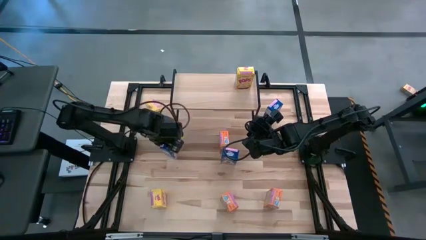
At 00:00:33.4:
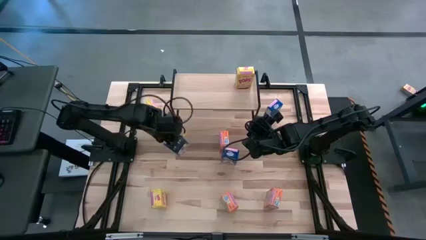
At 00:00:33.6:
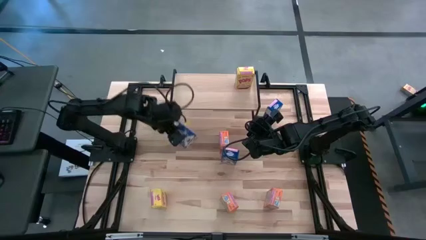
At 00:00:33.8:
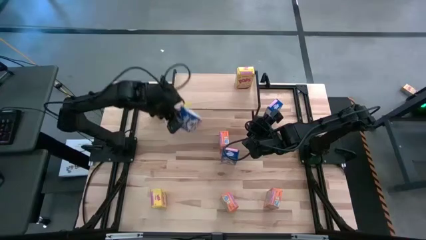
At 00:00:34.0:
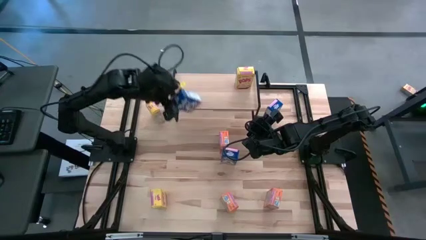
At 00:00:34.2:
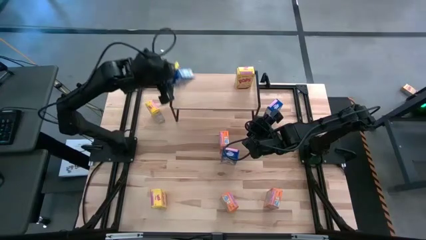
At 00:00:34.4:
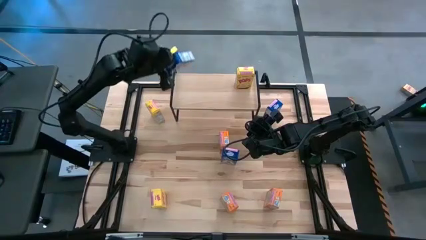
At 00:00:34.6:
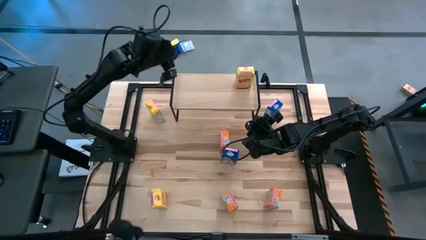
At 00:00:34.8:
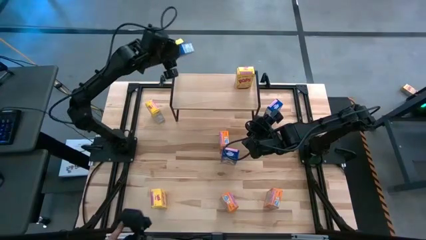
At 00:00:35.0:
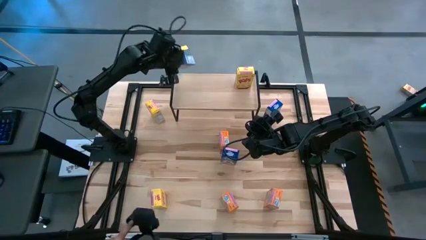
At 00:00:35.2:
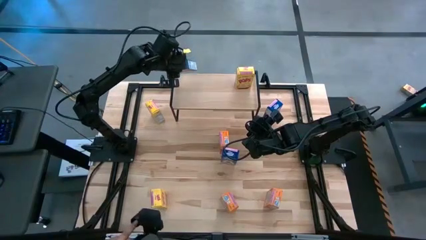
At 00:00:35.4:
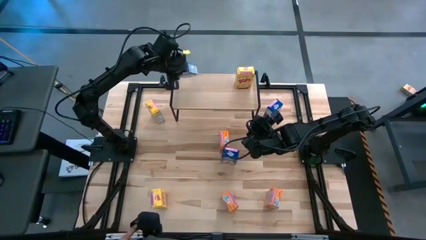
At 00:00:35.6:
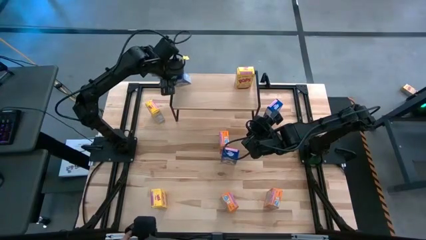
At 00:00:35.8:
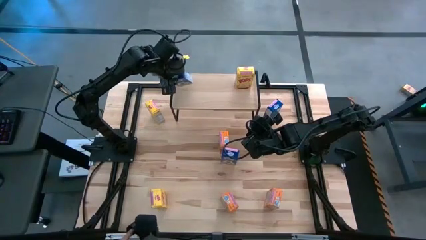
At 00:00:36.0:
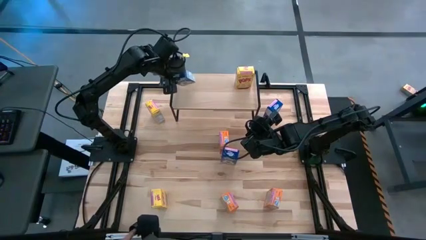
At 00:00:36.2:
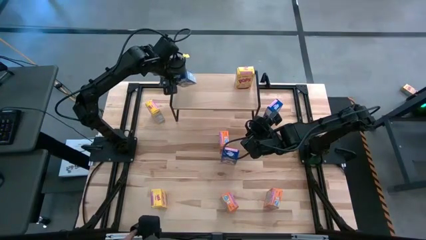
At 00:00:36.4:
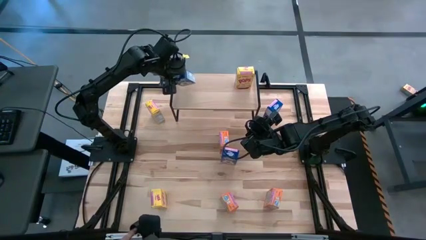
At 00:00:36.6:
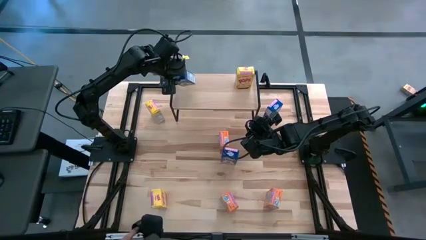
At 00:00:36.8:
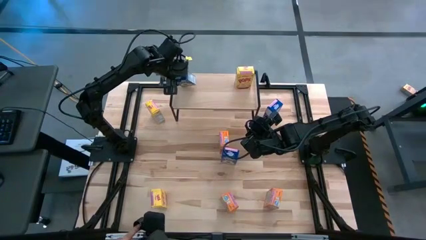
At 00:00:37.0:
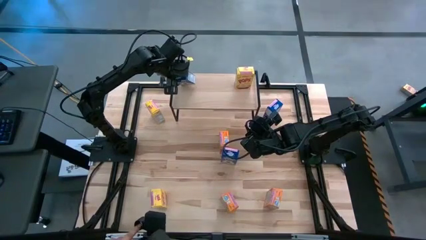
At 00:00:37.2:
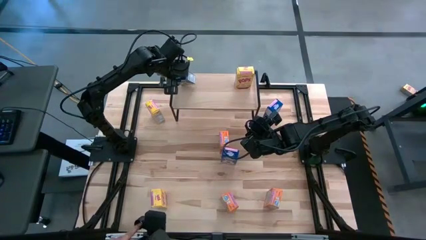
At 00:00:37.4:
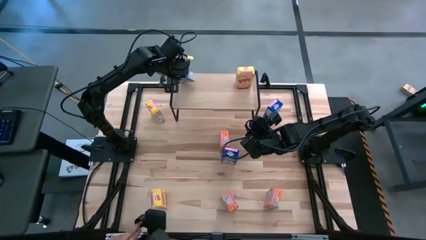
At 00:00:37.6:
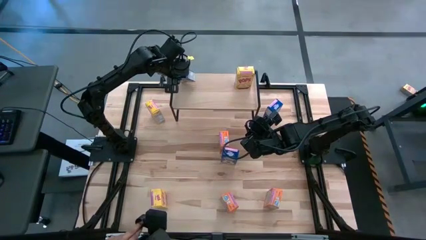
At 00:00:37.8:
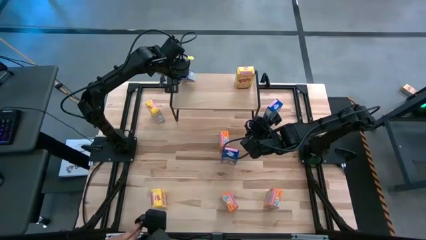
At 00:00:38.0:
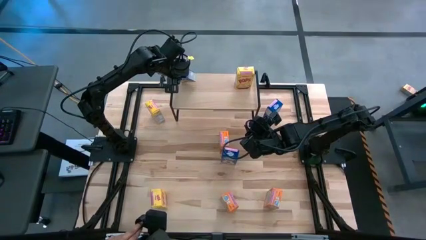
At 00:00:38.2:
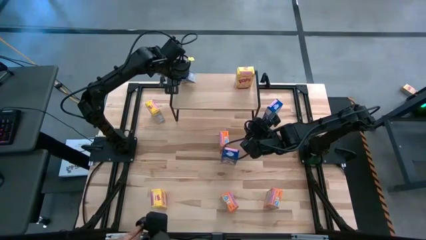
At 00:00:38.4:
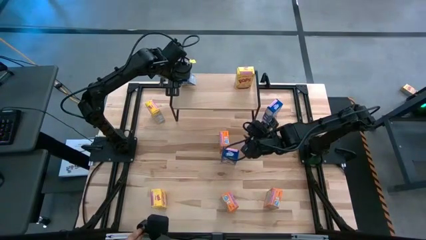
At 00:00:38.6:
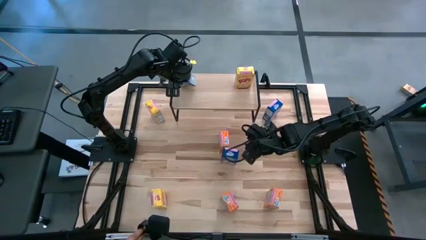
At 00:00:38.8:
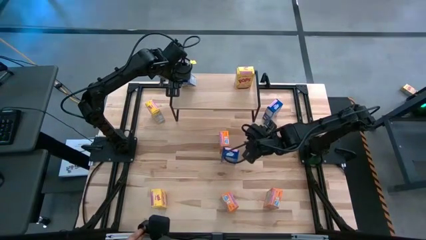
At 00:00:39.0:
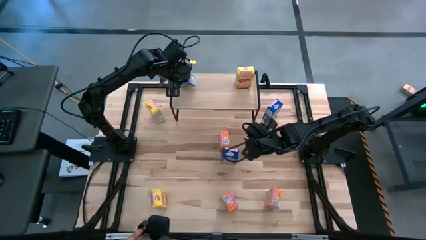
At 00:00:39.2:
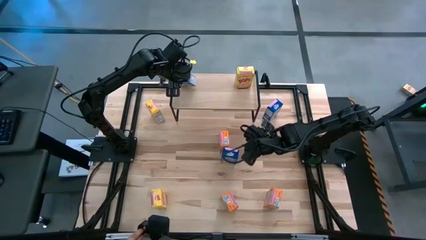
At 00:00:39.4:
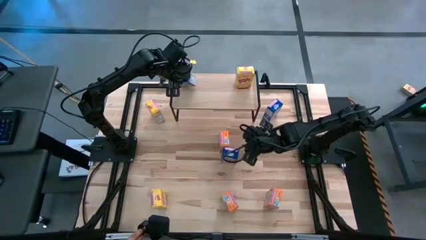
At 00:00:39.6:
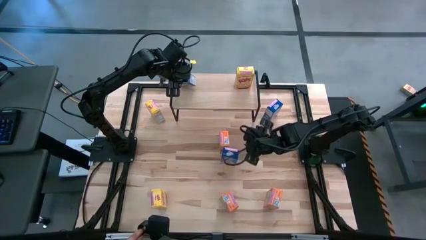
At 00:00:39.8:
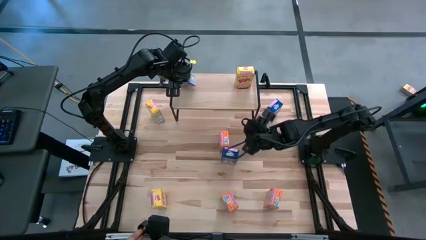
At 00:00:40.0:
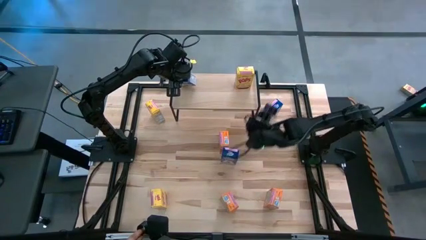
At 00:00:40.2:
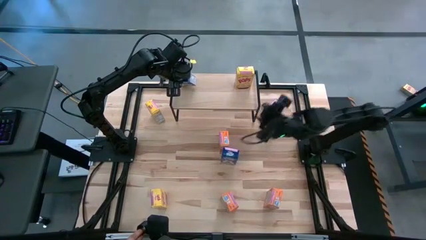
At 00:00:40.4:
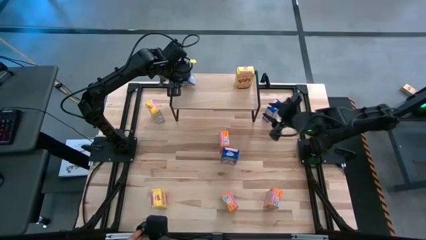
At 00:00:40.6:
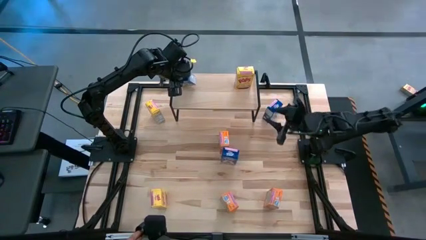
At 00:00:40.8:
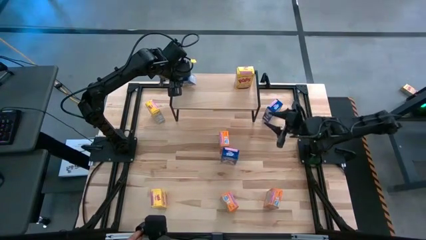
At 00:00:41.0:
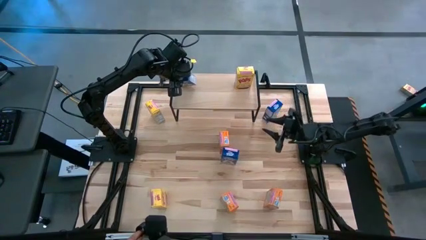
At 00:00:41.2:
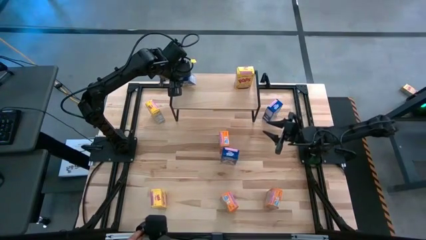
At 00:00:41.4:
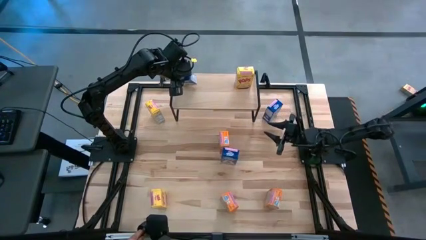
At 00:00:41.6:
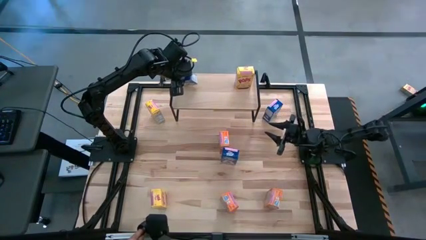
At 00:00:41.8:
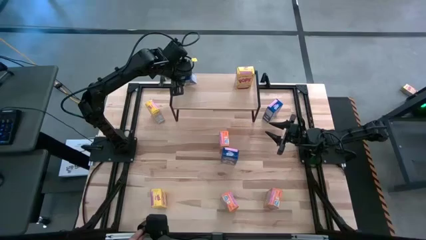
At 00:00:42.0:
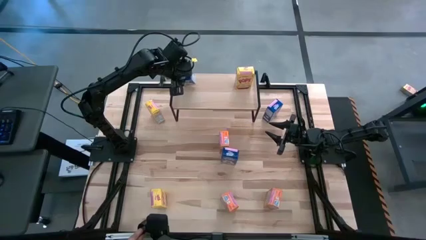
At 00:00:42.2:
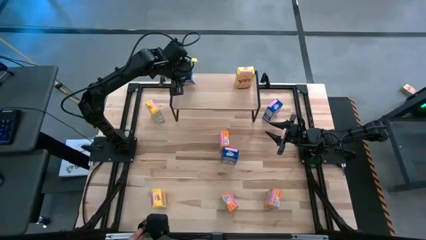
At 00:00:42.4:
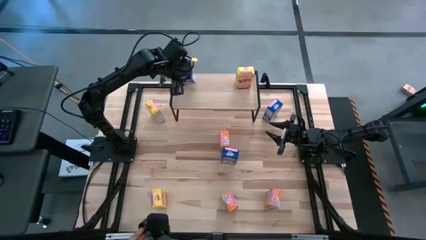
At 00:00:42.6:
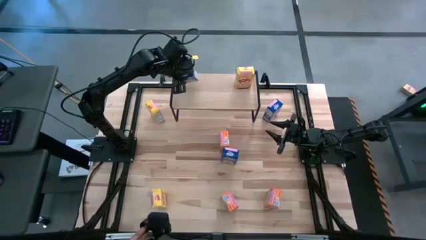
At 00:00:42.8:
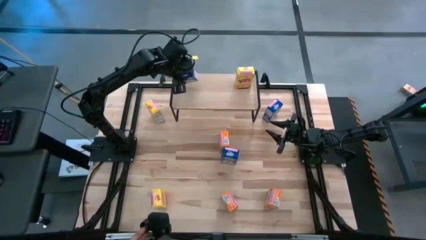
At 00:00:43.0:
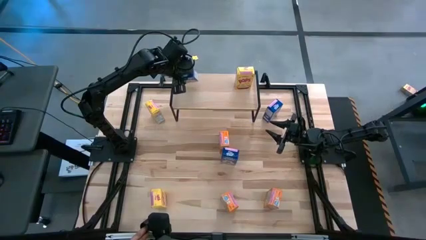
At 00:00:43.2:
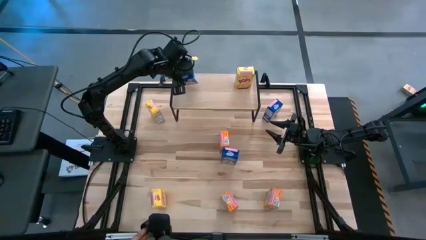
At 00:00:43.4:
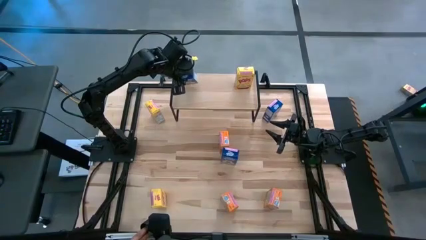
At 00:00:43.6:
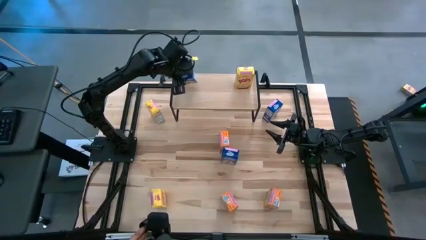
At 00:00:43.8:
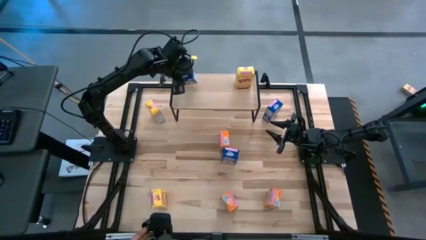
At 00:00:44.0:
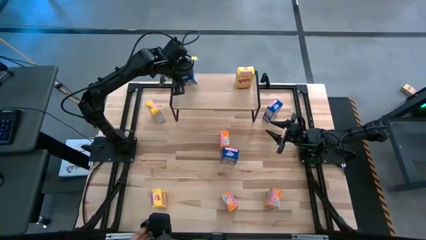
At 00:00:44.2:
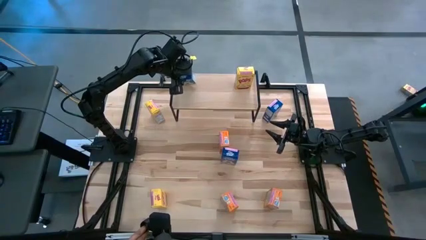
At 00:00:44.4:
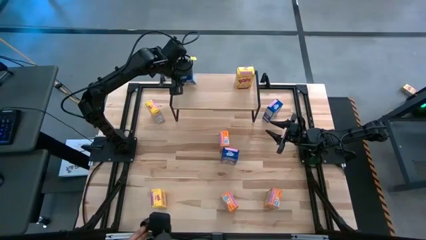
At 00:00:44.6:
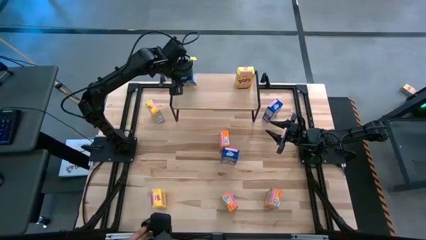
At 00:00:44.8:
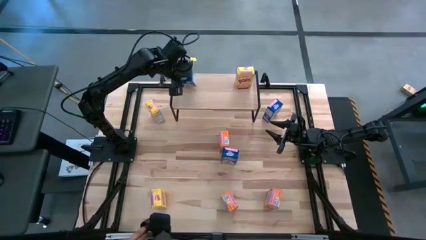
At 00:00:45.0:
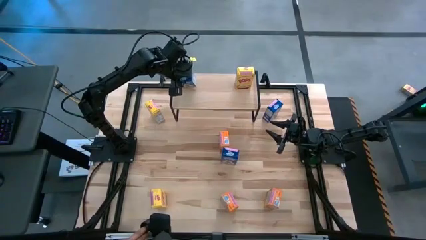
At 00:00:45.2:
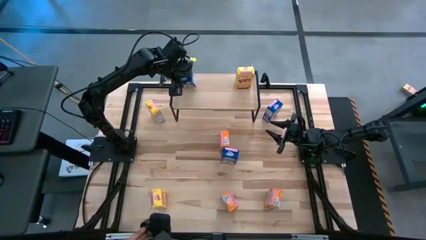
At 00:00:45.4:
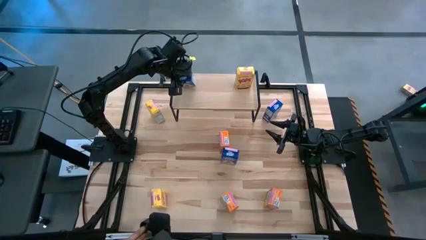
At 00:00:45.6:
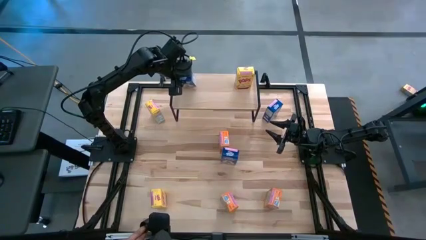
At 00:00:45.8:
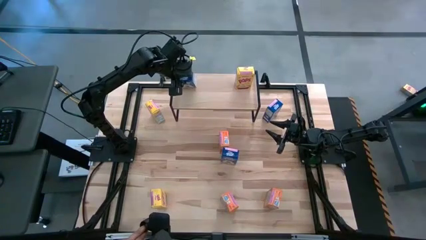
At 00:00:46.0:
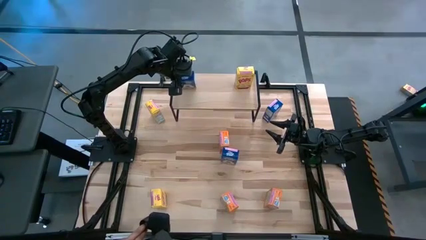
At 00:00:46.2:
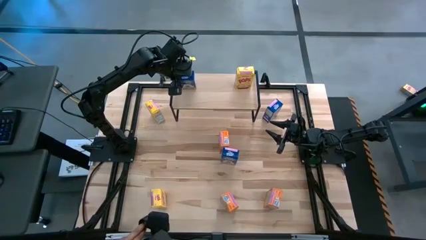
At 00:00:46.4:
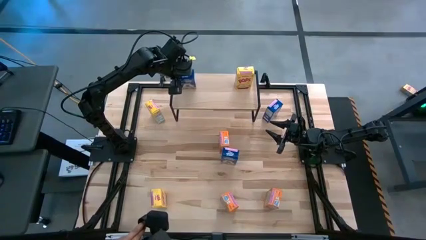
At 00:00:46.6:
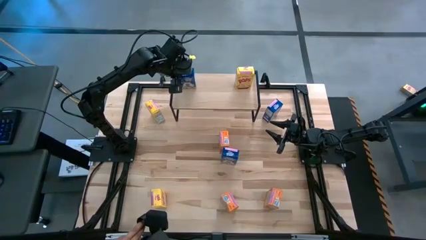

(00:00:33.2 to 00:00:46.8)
Task: Stack cereal on shelf
Put the bottom left blue cereal box on the shelf
